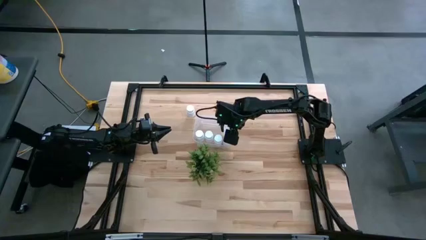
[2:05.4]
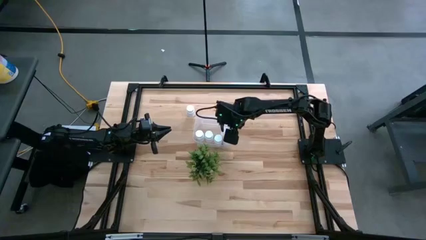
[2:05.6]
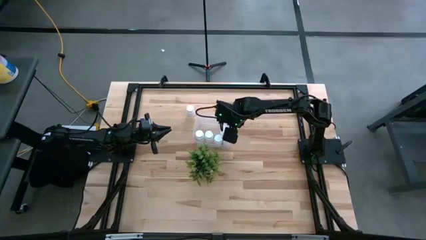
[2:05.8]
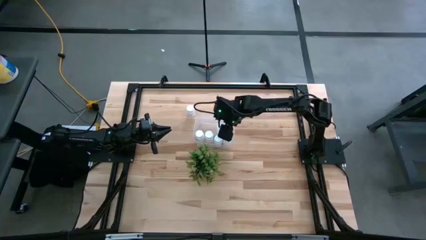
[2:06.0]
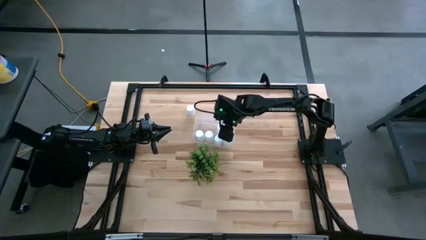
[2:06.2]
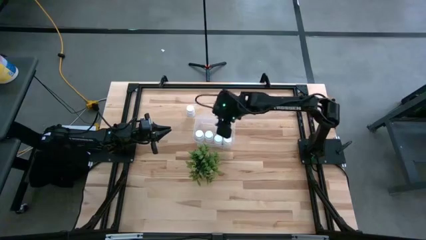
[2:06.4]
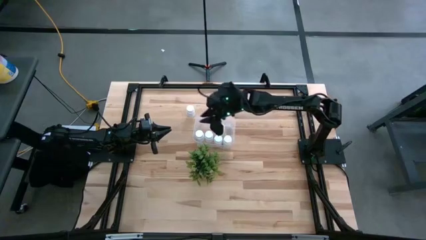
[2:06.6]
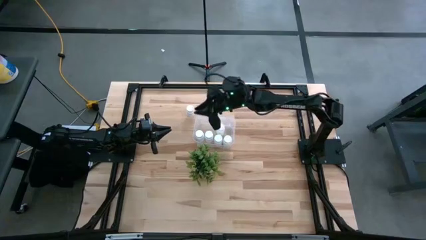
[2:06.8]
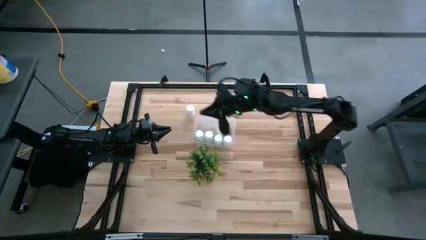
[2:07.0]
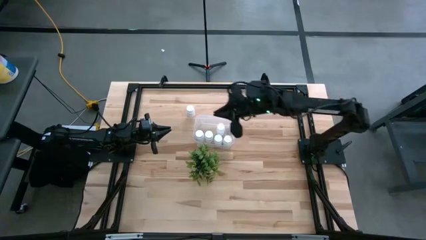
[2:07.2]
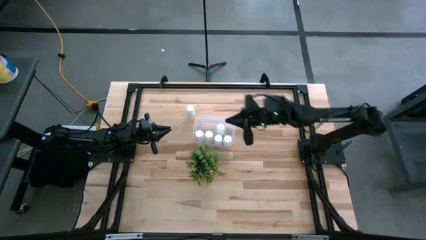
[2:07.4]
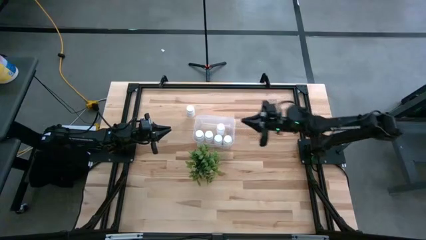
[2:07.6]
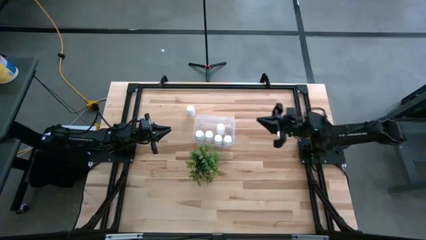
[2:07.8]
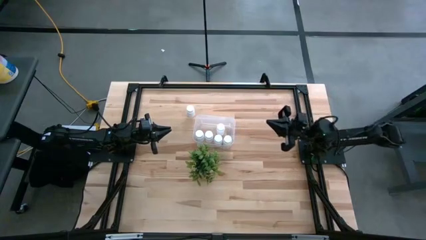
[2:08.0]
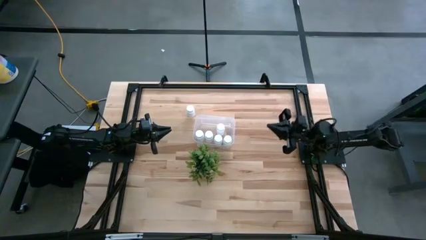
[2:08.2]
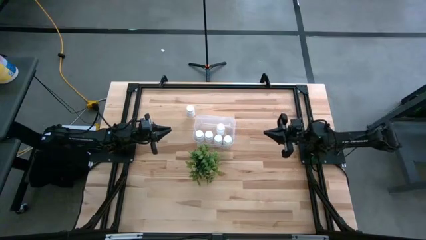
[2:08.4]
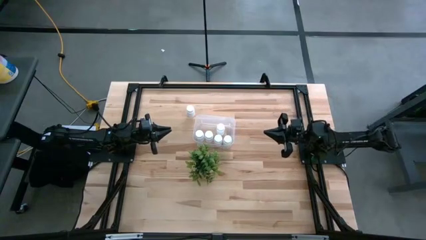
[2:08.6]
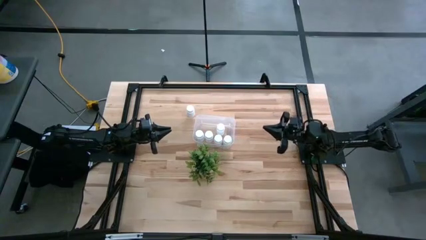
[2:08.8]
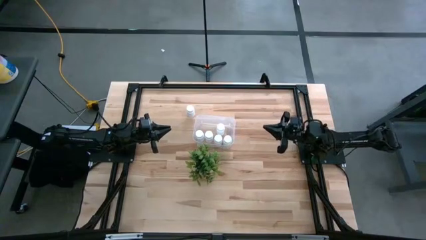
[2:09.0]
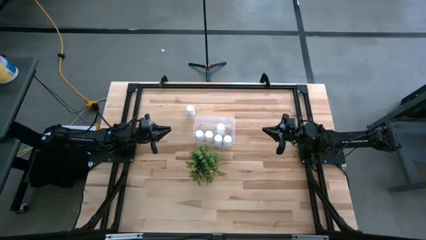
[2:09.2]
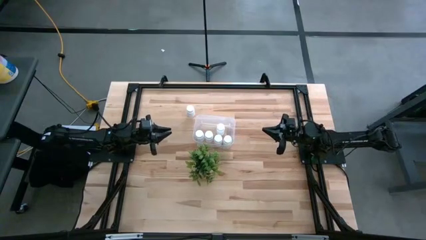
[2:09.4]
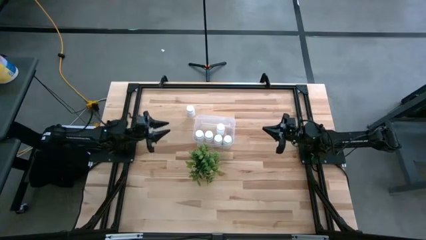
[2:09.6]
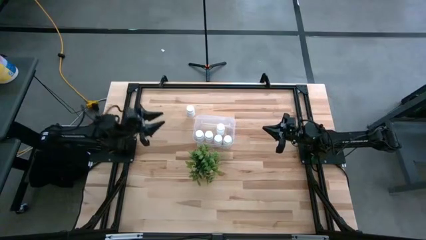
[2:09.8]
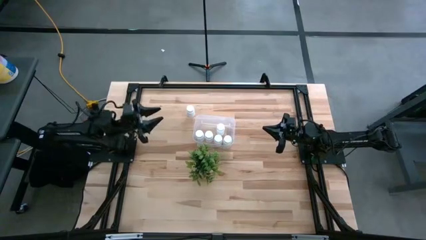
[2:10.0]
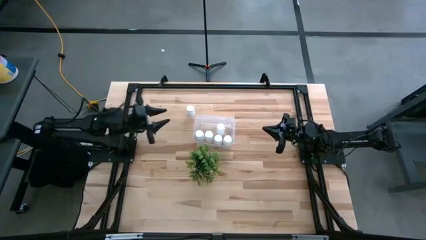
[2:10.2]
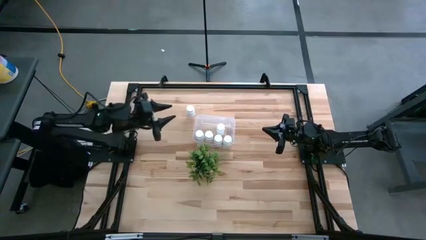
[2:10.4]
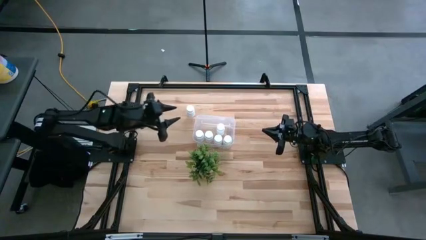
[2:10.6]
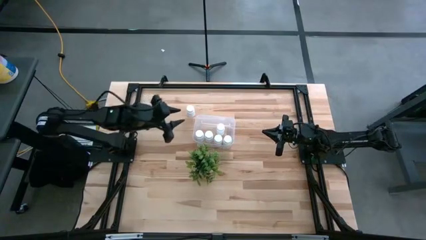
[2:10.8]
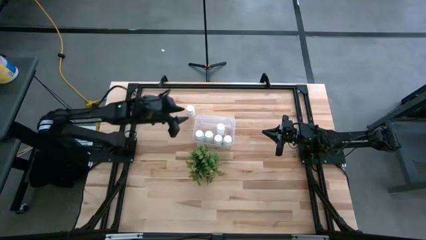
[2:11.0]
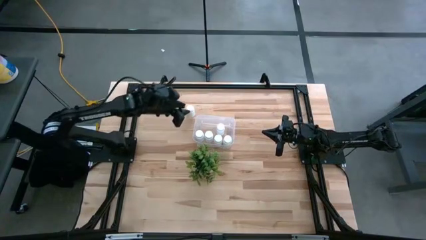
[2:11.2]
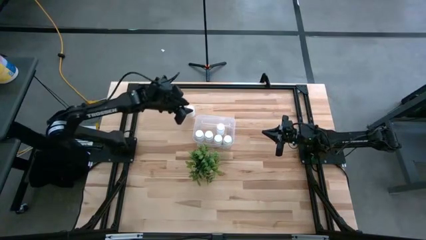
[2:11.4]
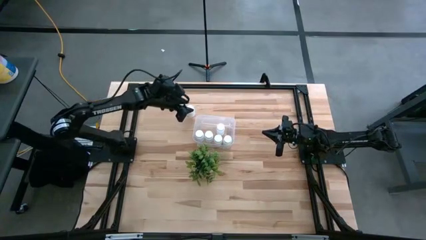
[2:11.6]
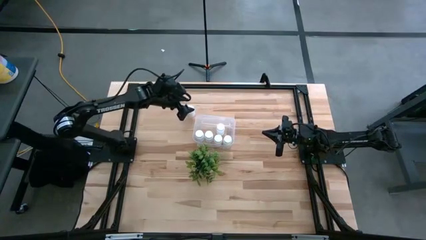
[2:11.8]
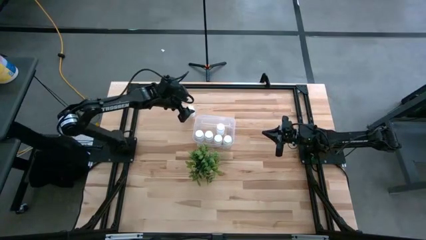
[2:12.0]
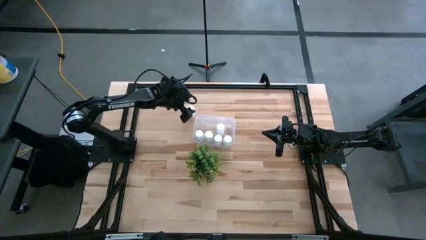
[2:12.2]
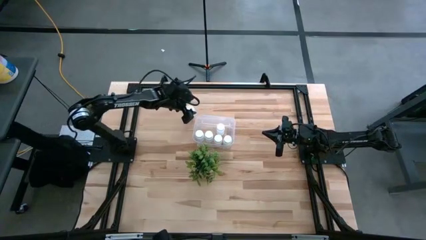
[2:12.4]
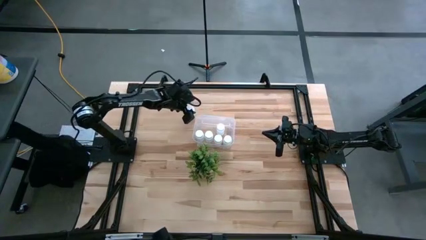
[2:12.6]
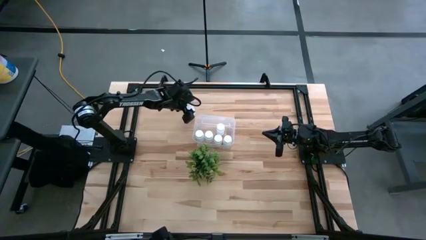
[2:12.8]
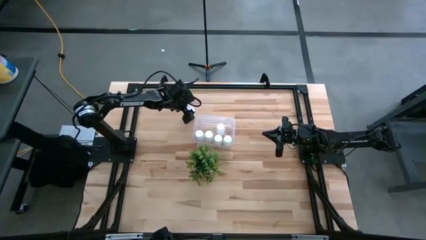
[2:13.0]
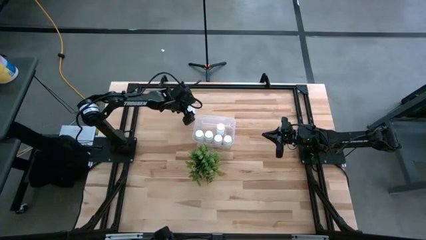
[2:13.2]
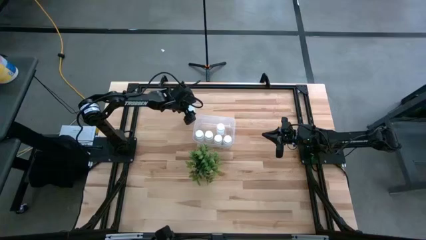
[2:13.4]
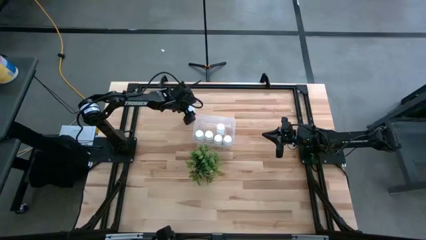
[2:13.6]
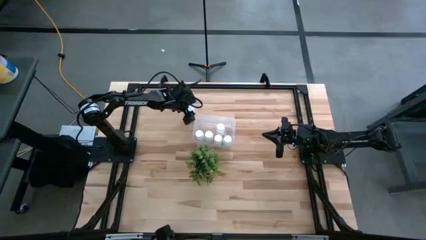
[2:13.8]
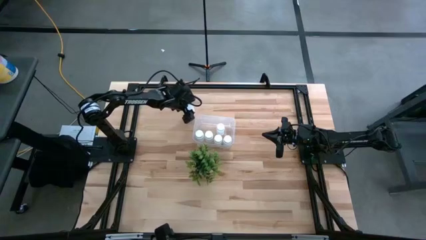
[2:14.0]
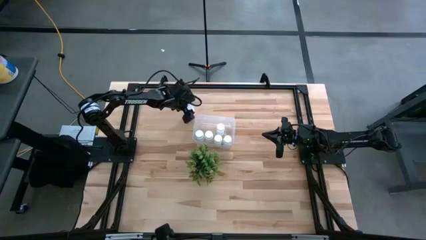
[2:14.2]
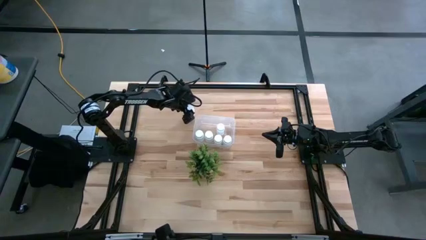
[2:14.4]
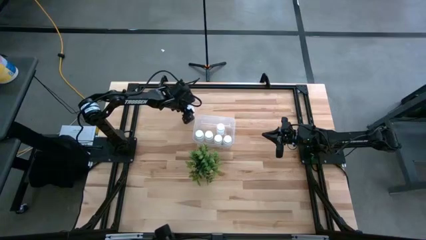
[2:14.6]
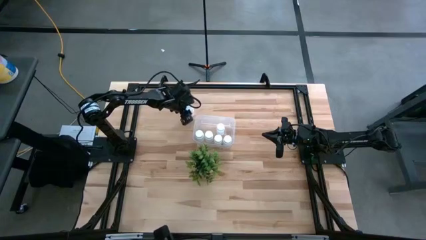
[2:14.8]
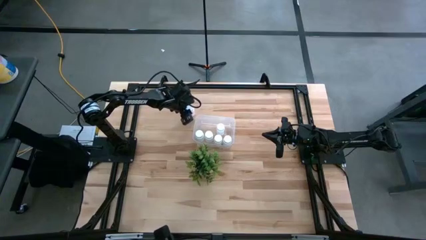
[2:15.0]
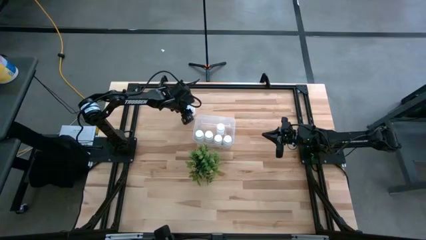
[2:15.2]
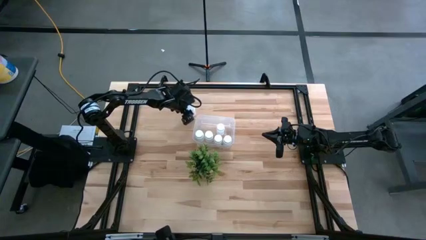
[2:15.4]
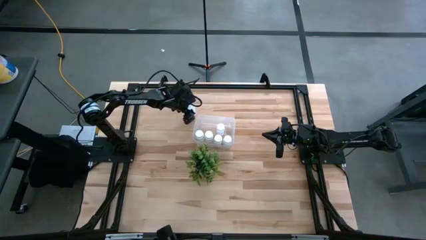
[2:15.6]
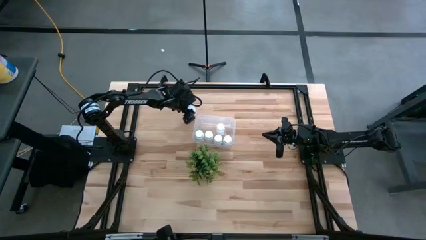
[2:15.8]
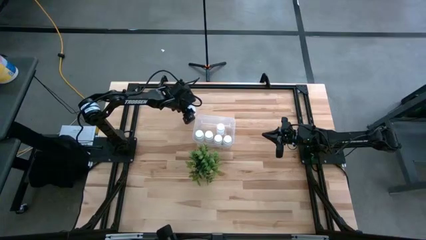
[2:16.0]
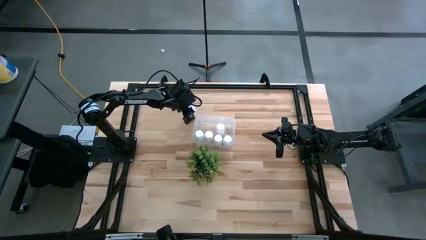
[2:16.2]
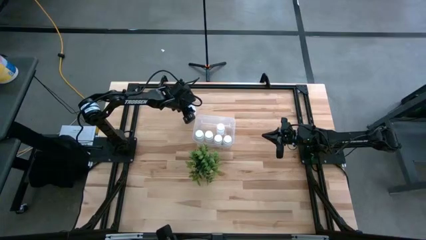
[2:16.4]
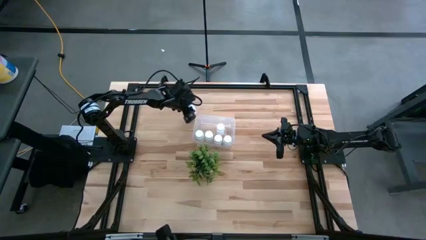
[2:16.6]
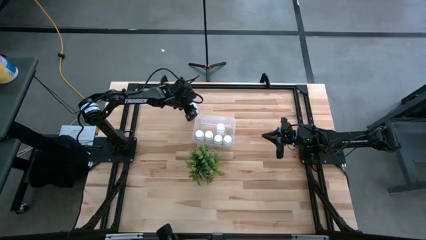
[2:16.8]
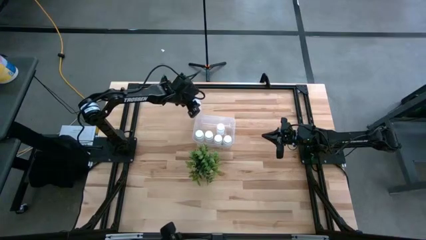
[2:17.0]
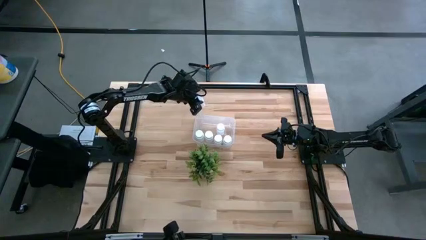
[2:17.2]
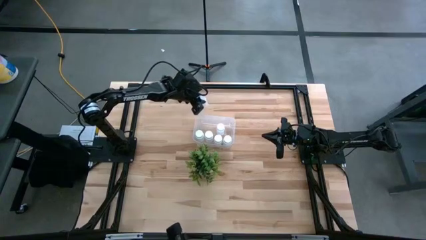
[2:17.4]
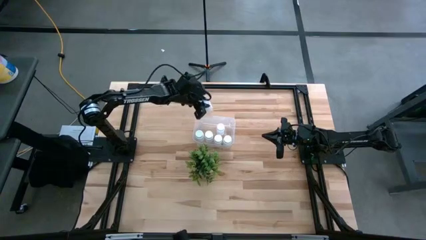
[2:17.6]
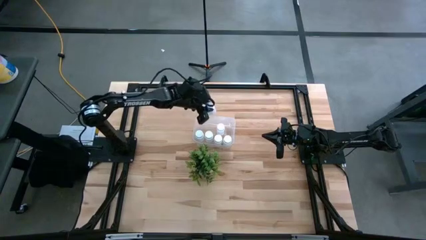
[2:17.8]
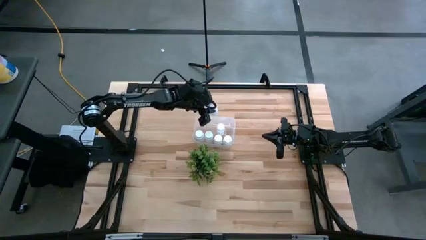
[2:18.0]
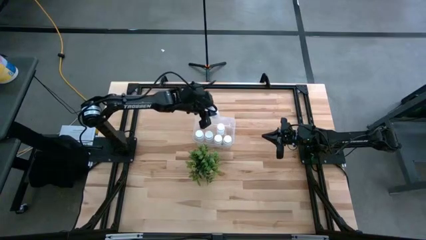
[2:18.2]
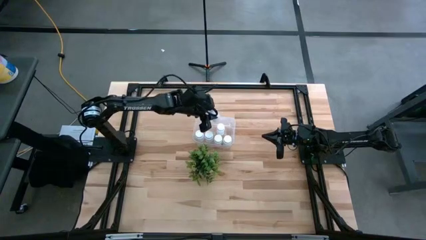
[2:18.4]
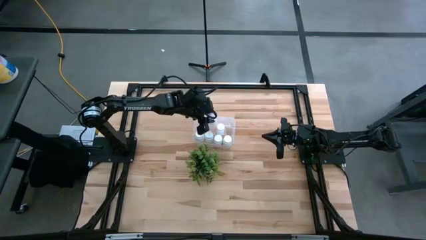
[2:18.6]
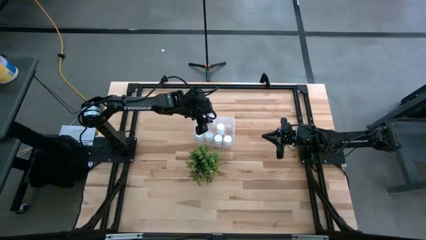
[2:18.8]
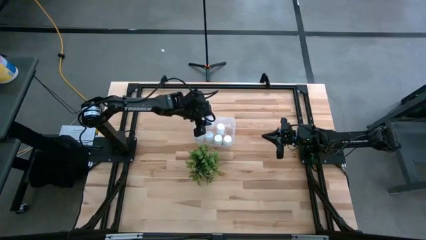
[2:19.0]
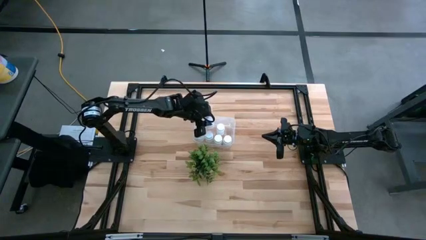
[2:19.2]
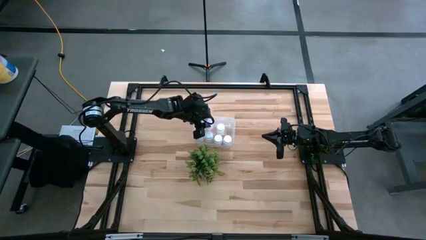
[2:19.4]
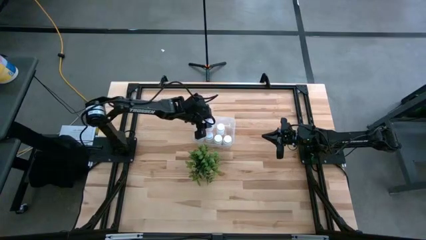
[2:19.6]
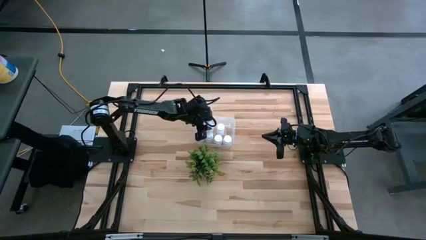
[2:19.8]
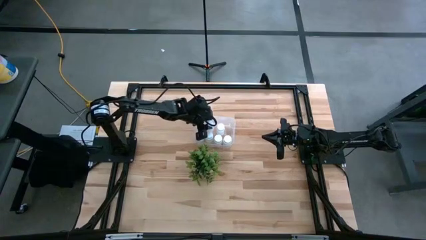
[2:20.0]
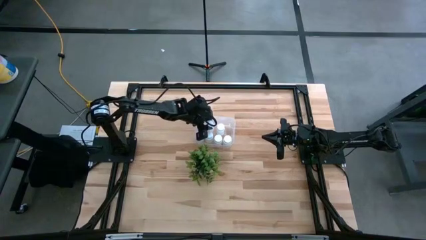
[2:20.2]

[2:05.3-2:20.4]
Task: Pick and place pill bottles into a basket
Put the white pill bottle in the transparent bin
